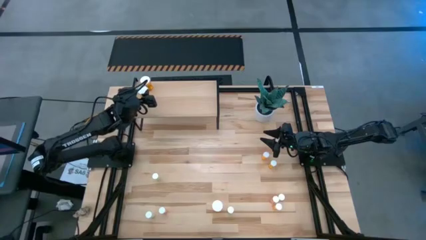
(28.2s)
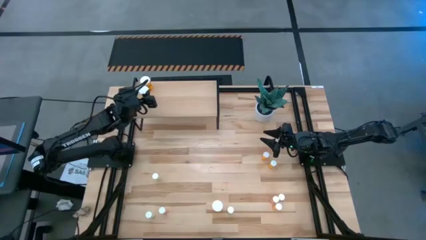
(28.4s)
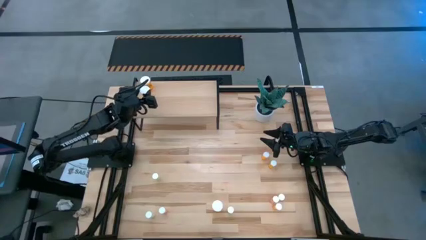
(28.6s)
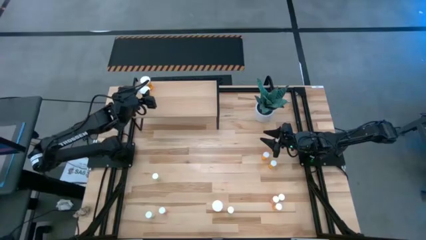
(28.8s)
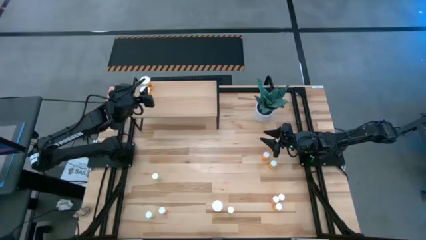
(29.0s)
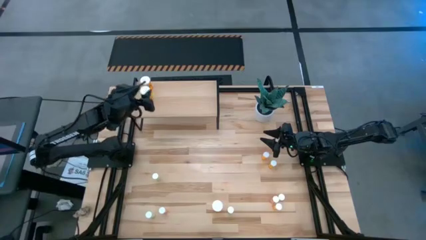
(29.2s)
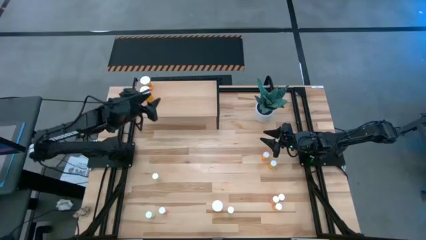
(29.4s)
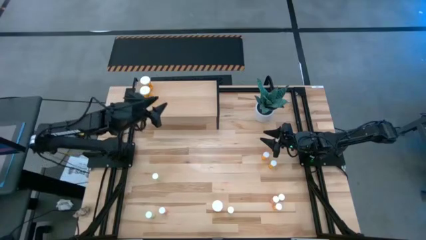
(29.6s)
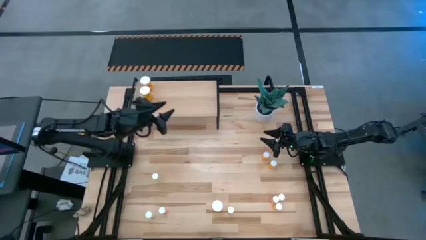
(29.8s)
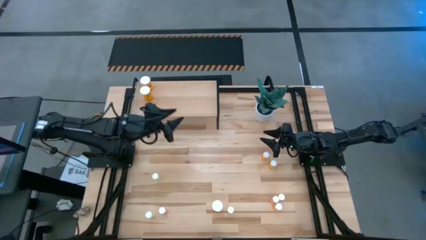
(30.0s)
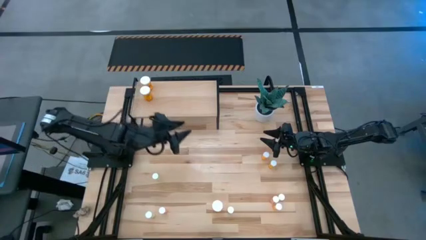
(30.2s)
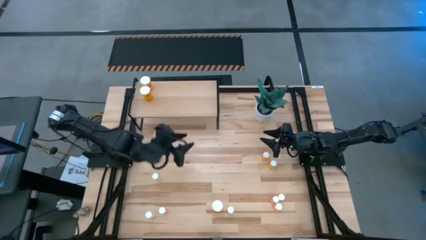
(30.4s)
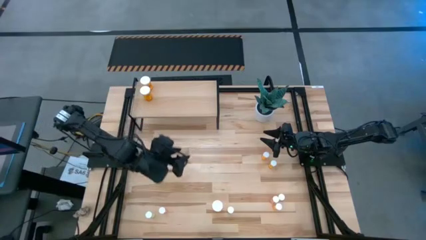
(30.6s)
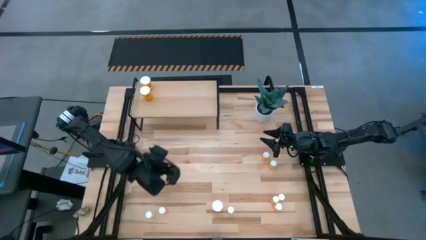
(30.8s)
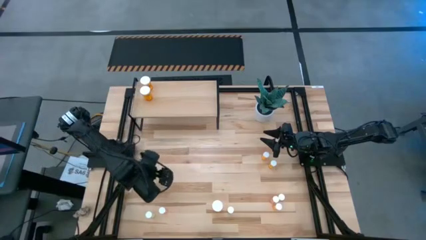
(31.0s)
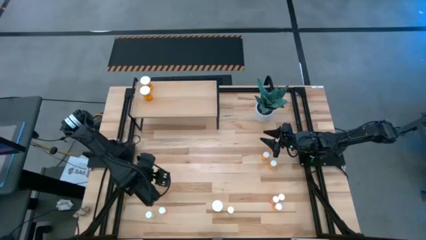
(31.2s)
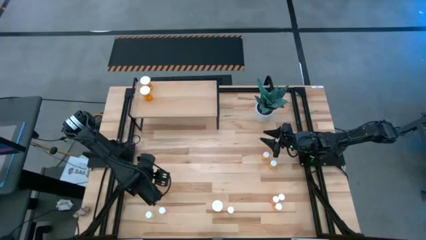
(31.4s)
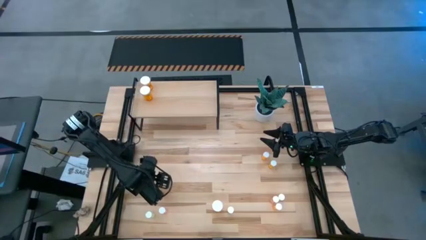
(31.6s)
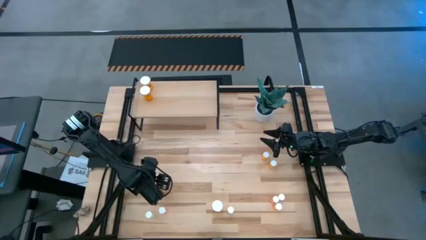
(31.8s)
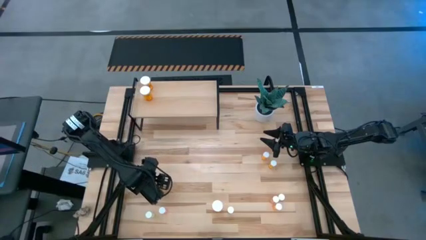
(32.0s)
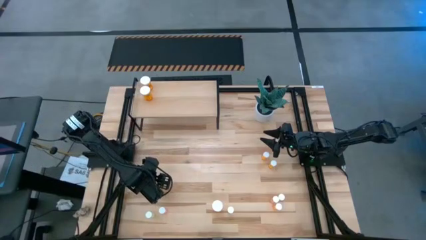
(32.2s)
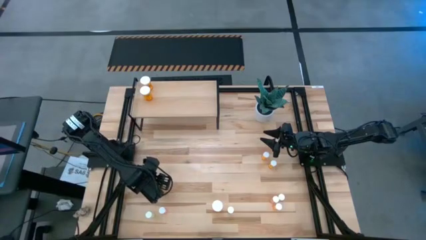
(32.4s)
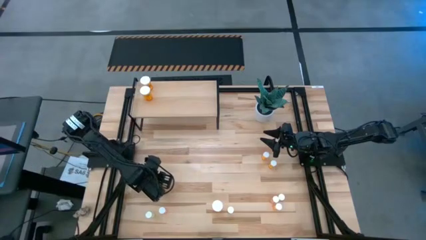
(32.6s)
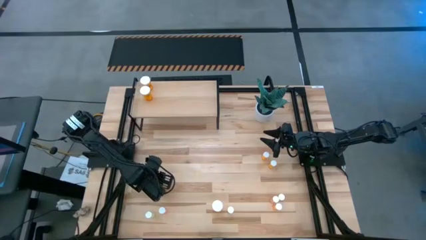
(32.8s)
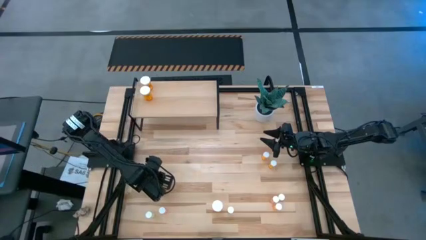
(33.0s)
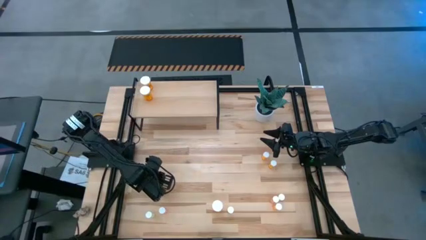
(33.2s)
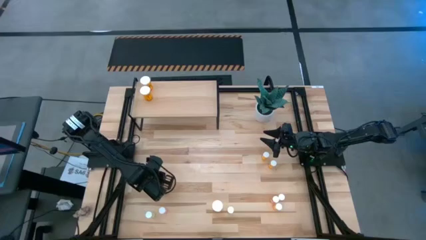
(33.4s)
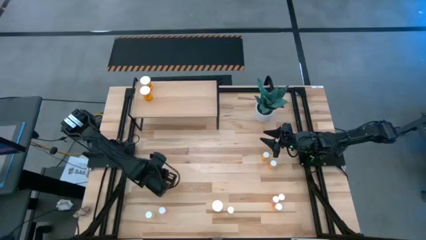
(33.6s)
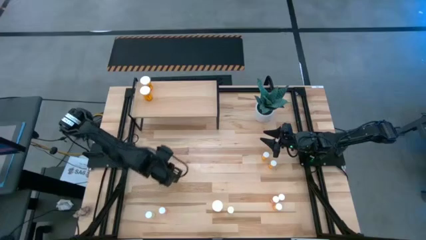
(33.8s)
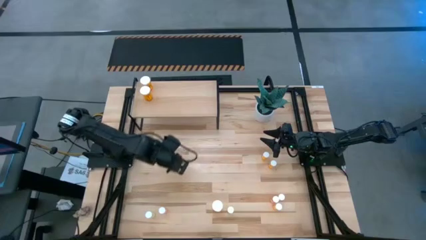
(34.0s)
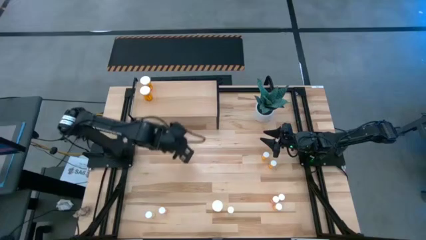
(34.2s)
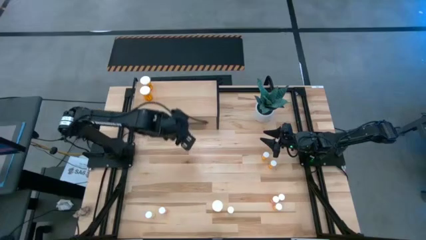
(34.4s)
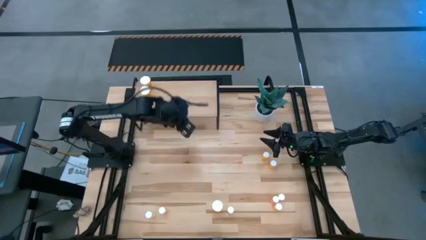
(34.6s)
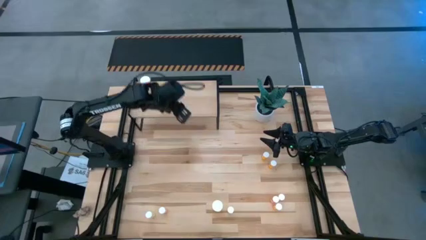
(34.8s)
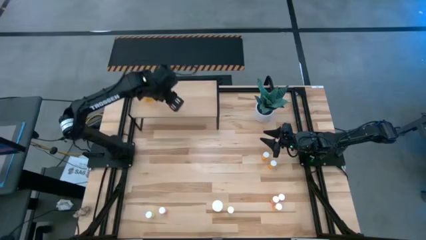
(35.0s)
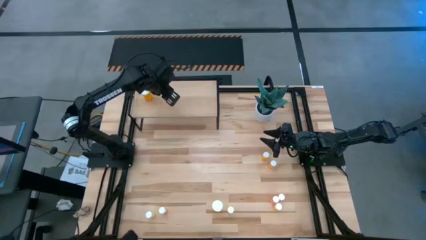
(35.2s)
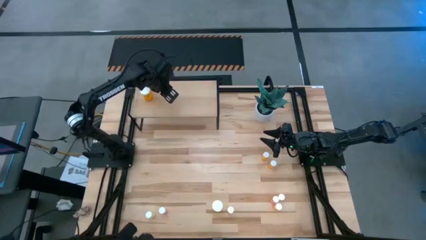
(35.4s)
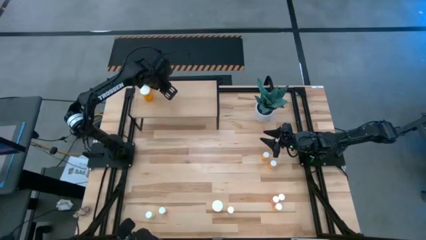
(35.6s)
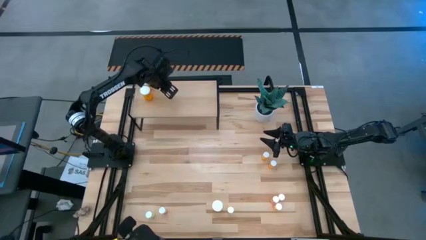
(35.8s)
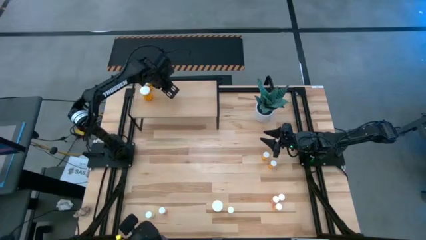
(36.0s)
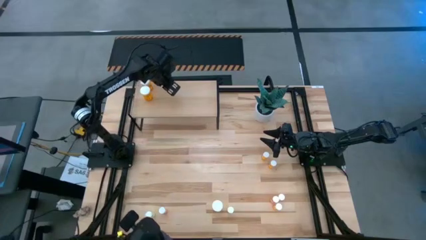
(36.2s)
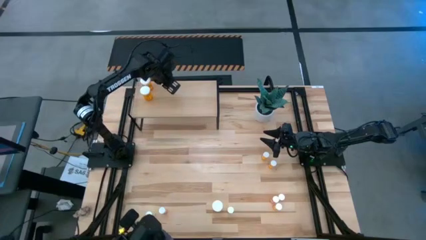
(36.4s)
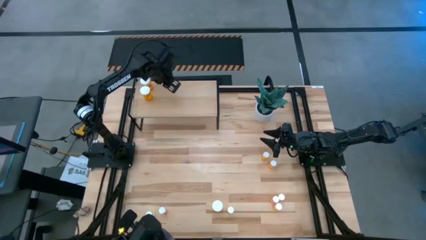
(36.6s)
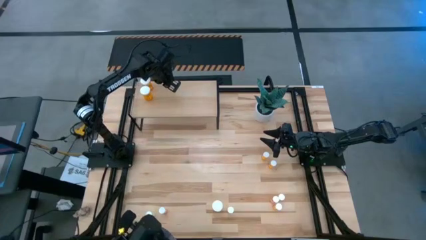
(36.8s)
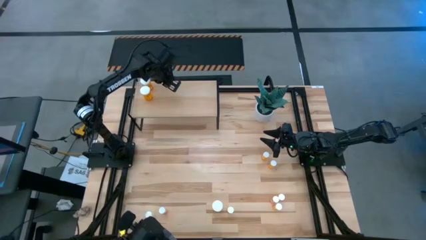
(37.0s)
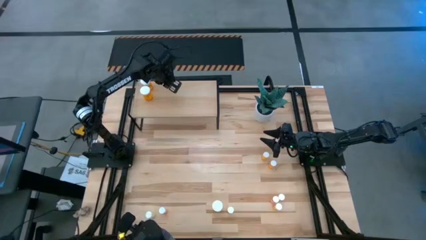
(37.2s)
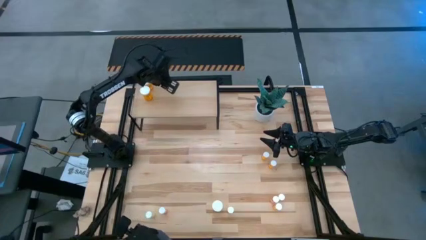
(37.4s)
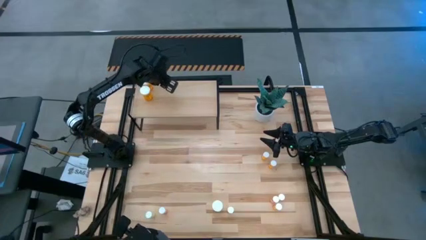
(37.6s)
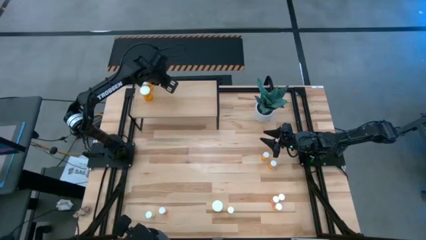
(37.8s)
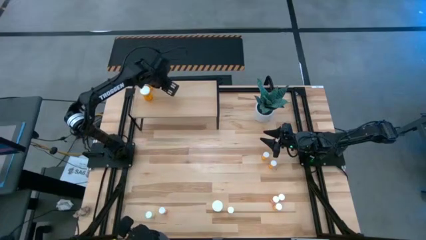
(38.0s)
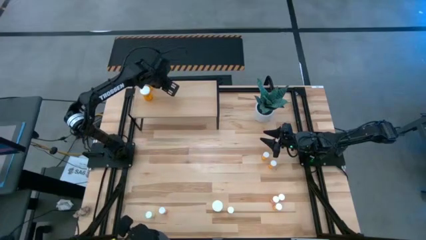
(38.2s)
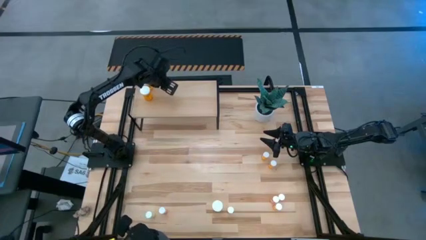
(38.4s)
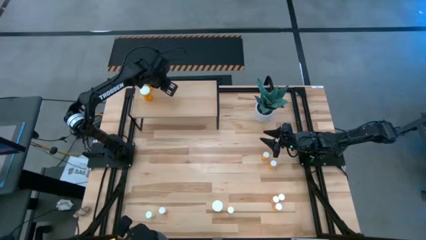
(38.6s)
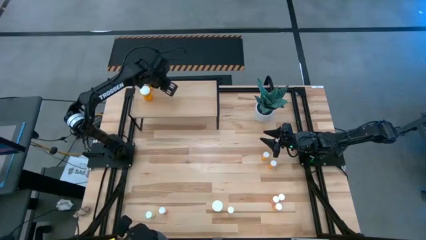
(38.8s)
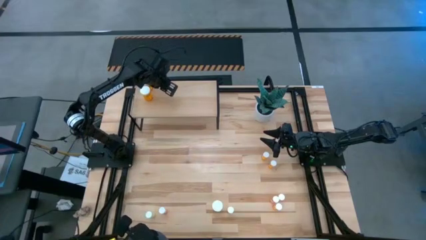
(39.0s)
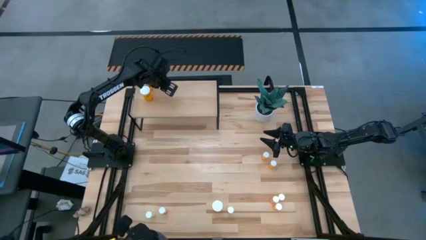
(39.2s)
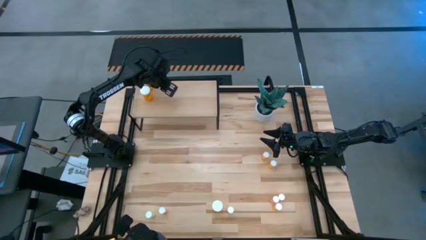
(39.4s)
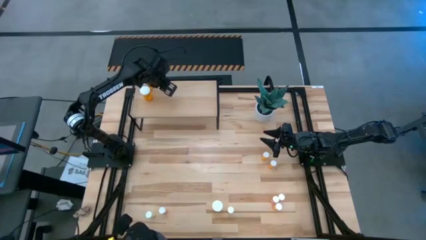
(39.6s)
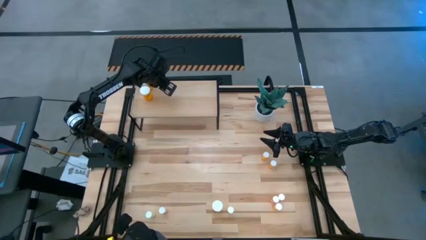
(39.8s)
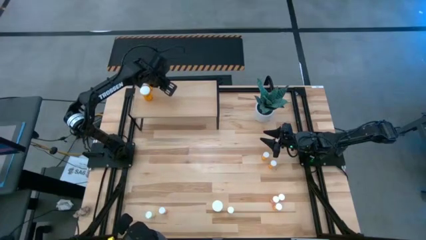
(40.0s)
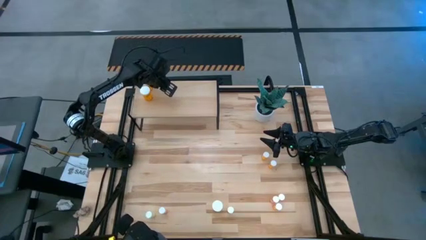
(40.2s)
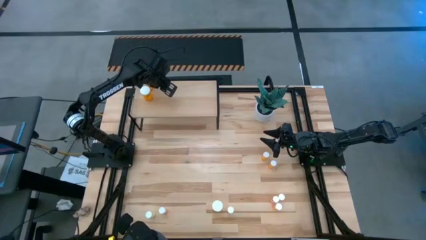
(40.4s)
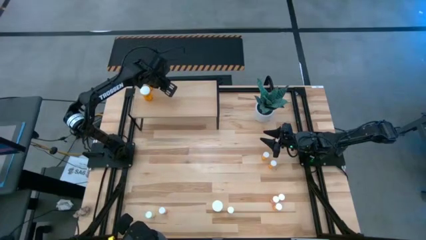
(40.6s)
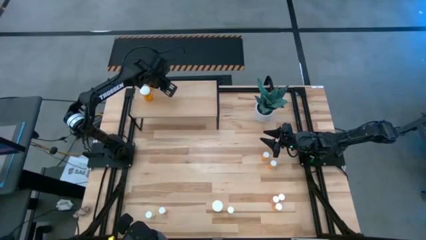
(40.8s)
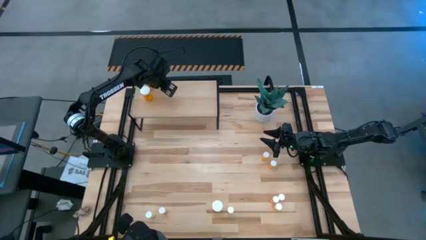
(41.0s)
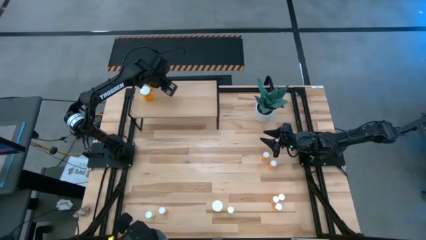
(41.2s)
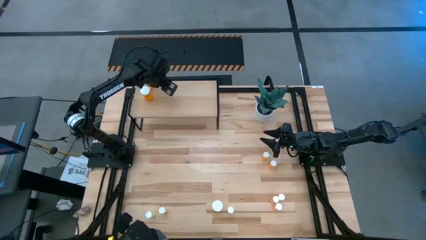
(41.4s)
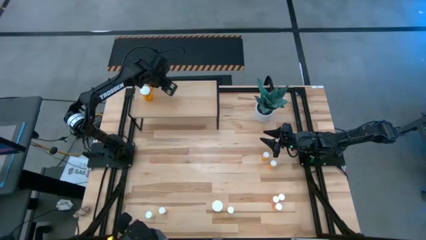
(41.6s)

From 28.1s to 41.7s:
Task: Pick and place medicine bottles onto shelf by color
Put the top yellow pill bottle on the shelf
